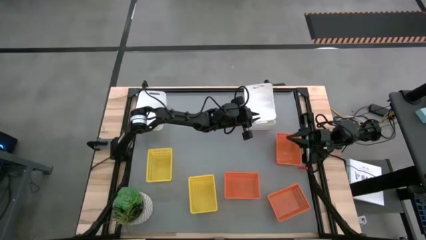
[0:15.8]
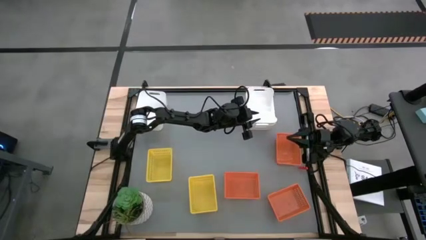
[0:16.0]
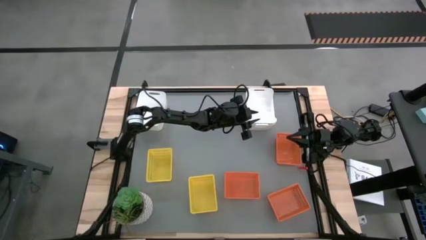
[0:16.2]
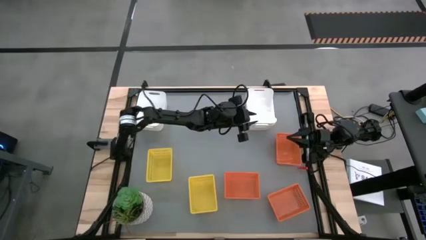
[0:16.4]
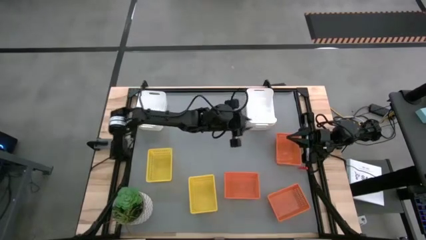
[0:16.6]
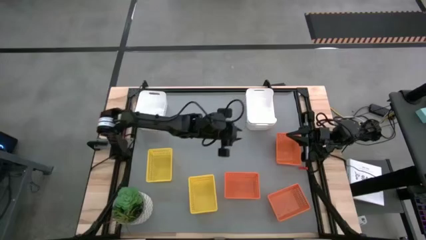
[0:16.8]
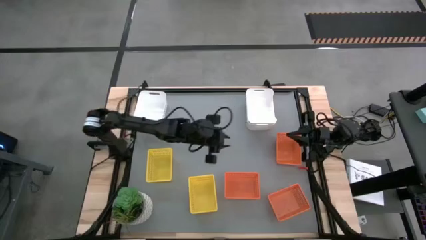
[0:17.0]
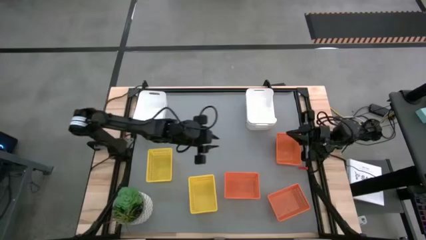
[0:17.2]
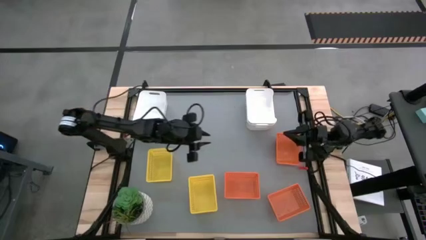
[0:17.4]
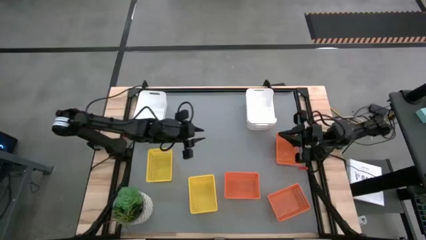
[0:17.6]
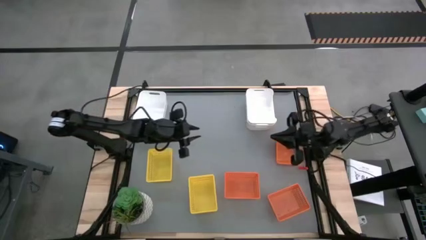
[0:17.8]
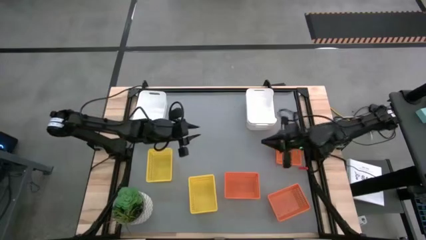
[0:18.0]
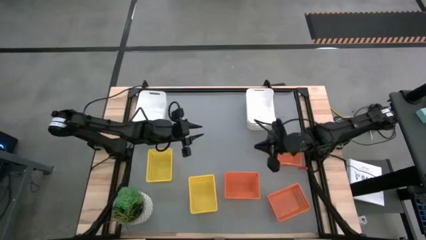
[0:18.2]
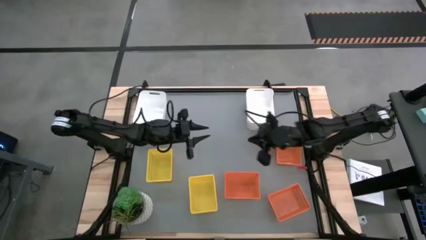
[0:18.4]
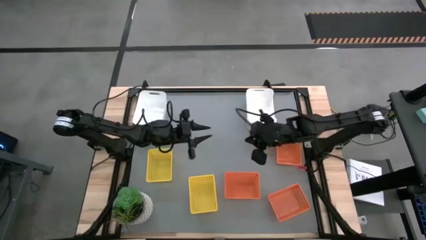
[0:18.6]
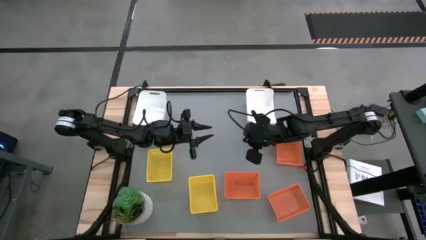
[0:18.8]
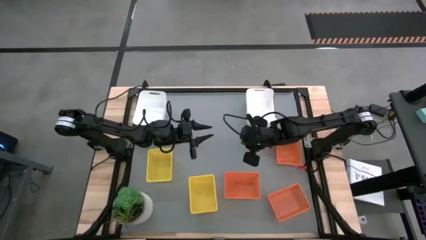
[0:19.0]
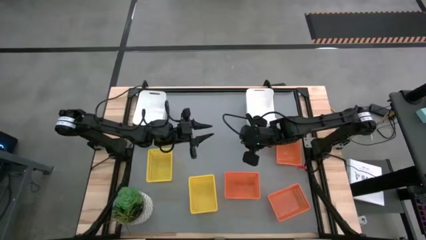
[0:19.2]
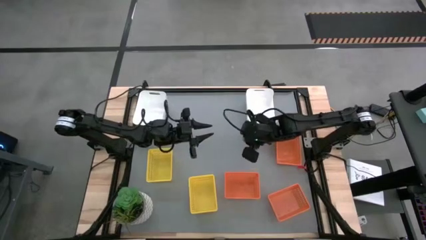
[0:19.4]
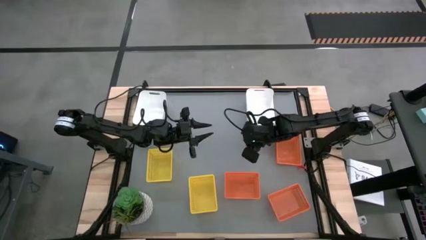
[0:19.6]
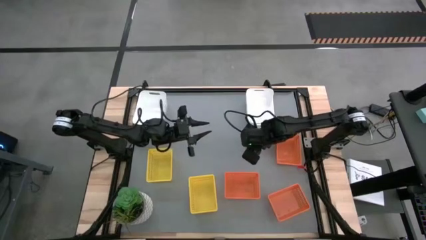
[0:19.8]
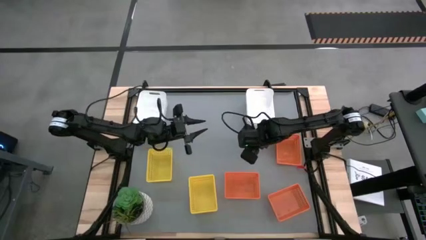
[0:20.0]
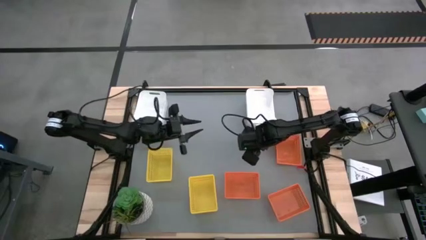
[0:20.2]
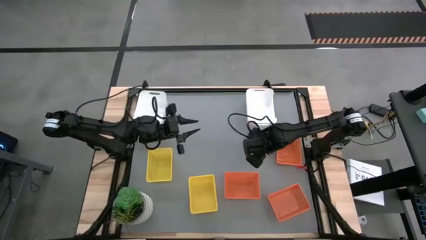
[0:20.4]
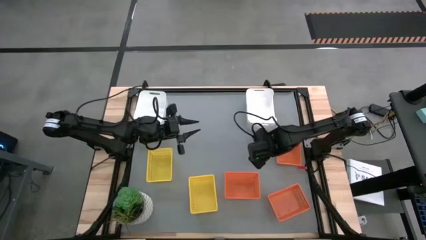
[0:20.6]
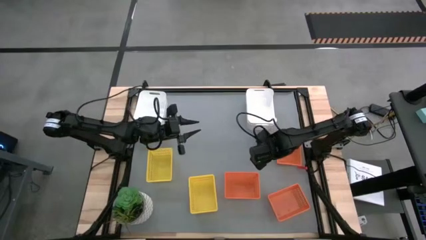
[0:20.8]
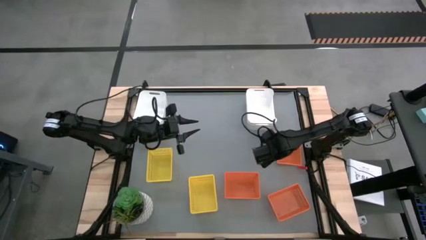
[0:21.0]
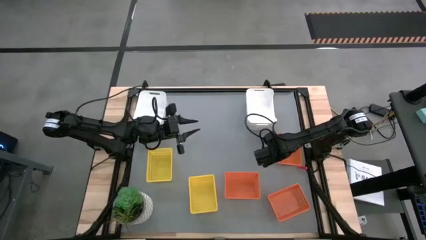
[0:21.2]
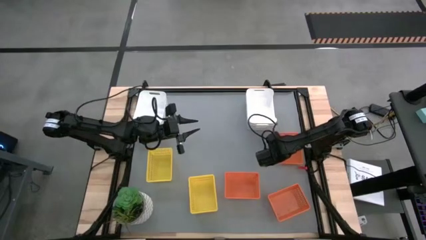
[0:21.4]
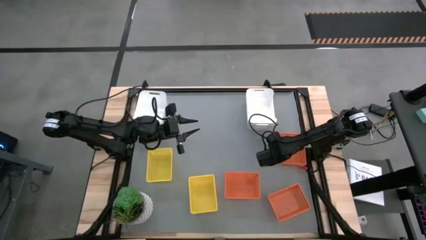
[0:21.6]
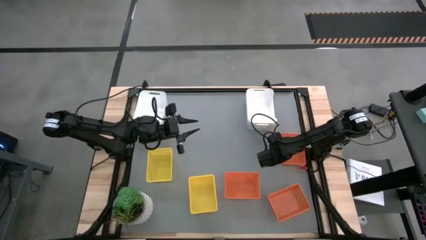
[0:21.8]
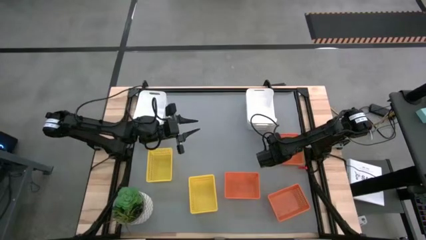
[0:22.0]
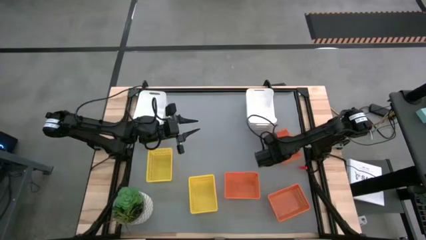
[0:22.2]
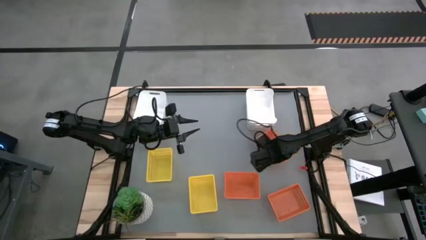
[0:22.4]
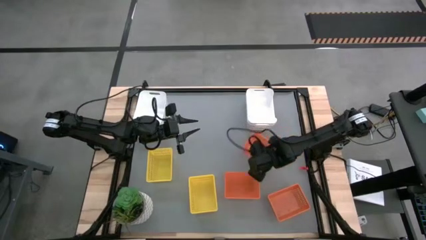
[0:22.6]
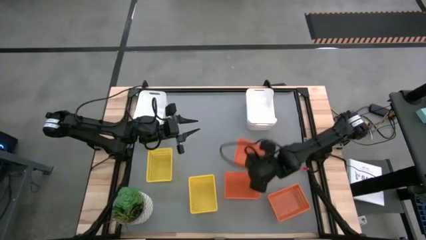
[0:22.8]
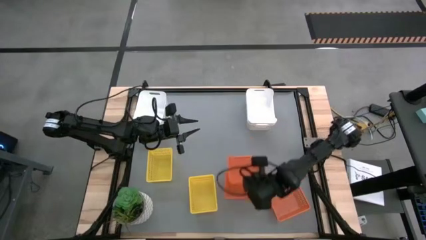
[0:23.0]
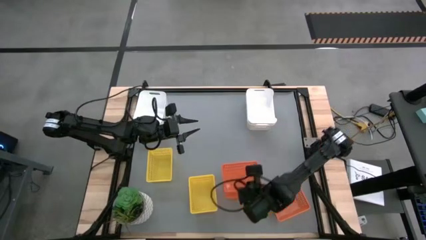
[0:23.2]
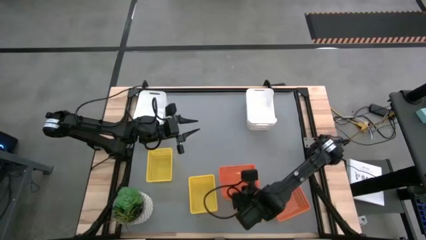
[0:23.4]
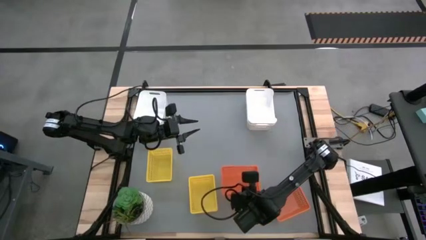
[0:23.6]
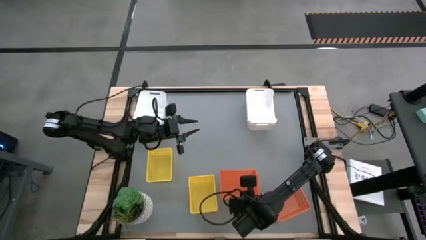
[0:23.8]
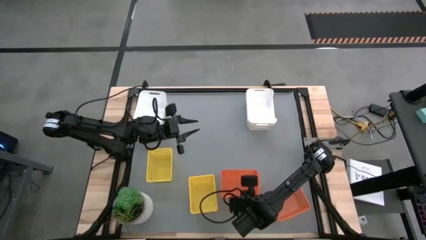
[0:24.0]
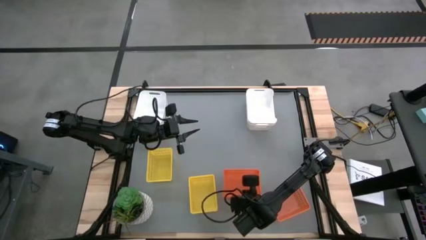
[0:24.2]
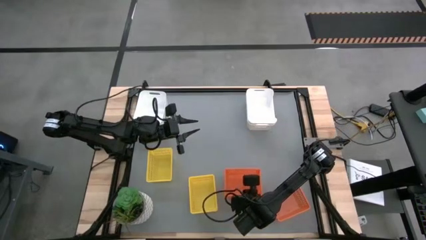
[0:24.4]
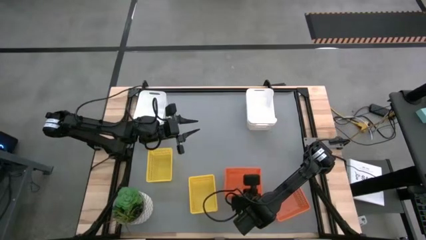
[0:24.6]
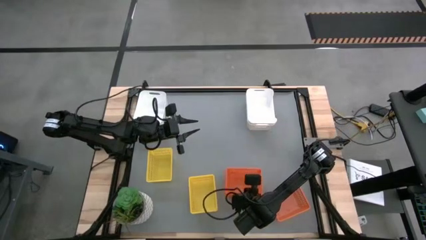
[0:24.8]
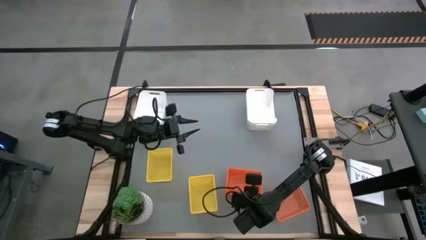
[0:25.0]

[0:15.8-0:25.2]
Stack the top orange bin on top of the middle orange bin

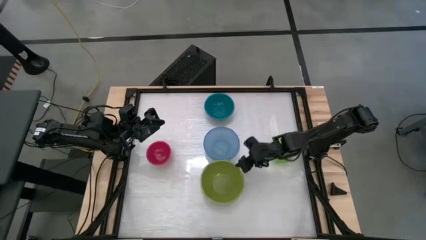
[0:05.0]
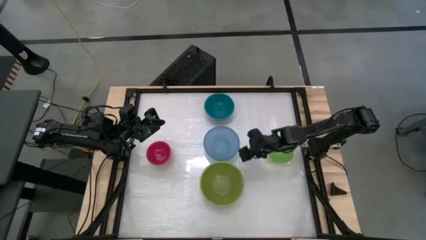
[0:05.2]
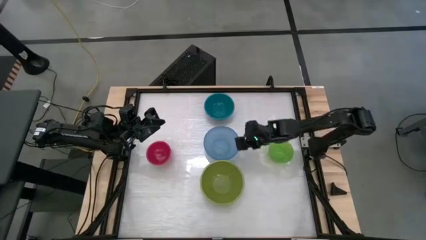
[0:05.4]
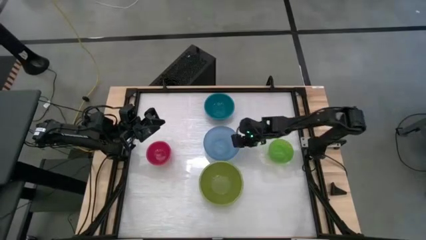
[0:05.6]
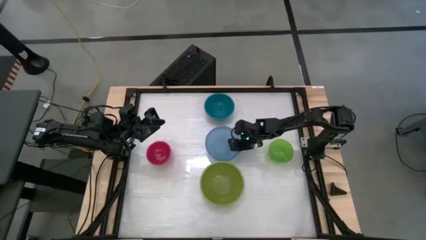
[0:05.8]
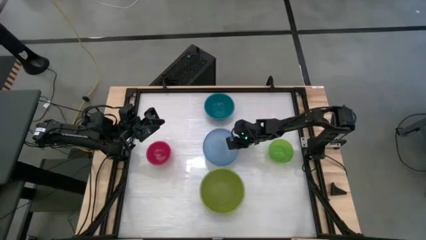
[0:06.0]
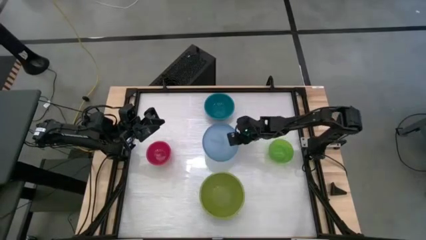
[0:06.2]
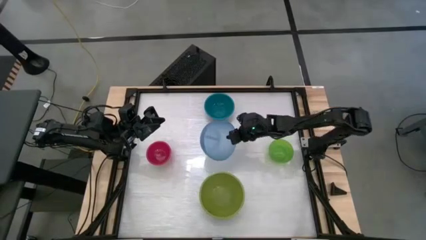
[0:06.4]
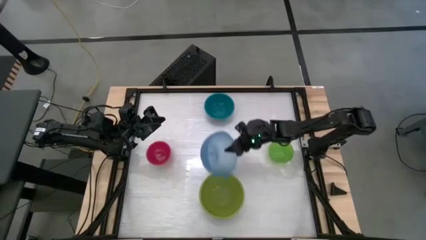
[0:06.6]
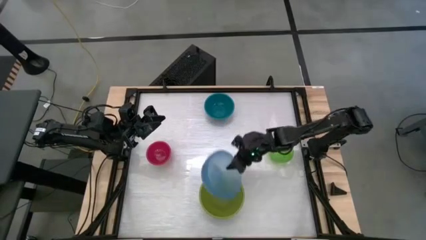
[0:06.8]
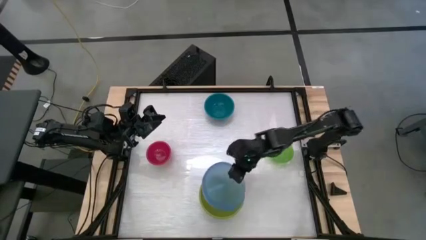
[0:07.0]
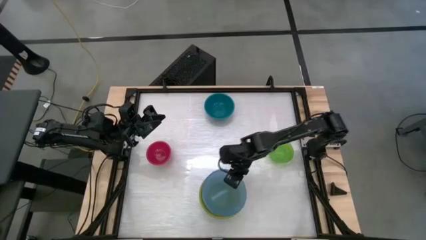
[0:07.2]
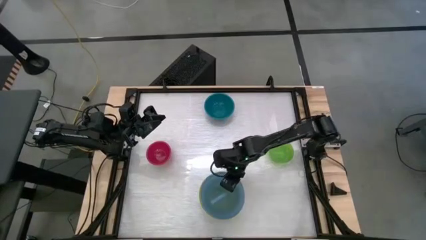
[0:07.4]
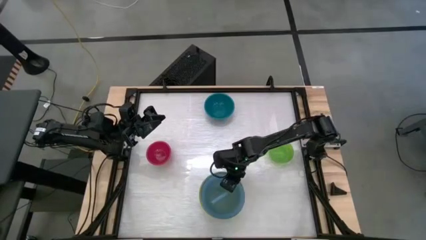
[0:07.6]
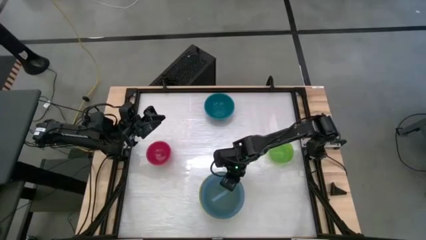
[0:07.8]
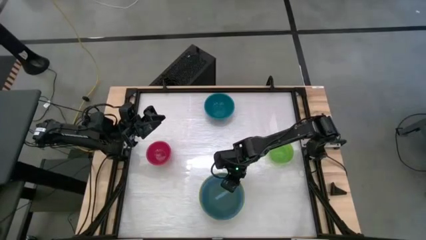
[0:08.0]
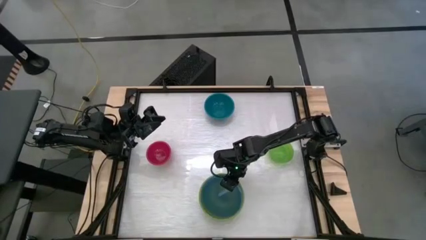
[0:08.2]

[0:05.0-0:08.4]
Stack the blue bowl on the light green bowl

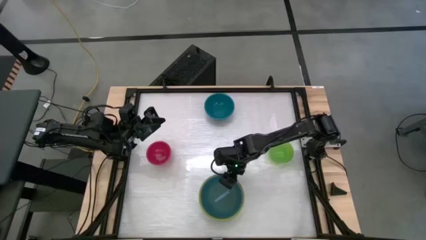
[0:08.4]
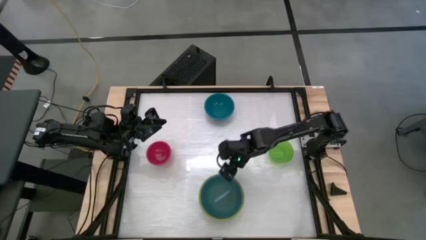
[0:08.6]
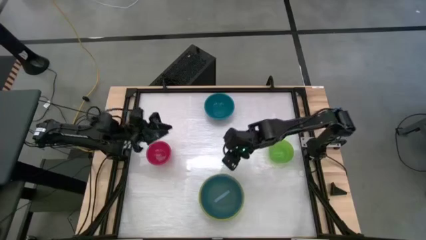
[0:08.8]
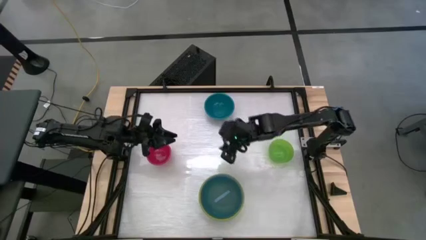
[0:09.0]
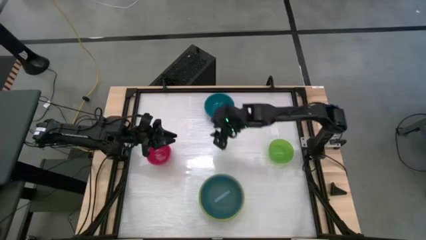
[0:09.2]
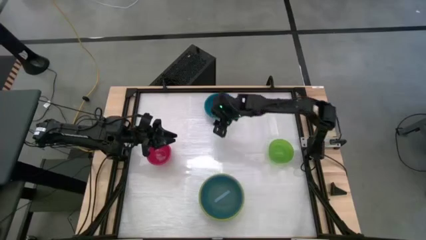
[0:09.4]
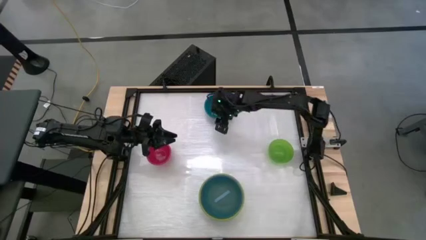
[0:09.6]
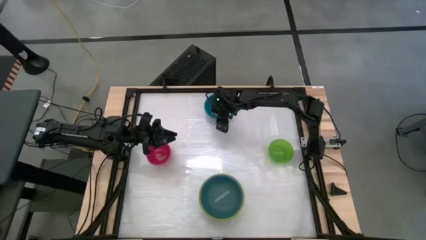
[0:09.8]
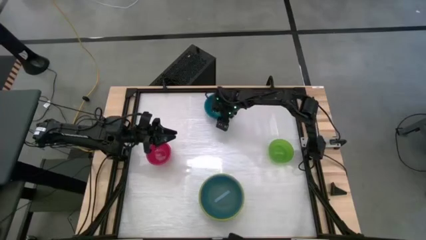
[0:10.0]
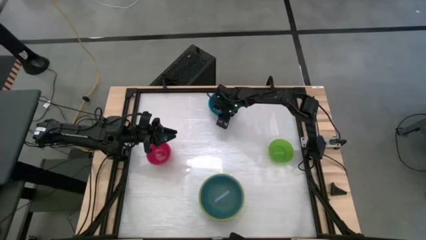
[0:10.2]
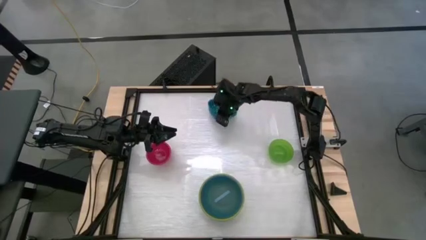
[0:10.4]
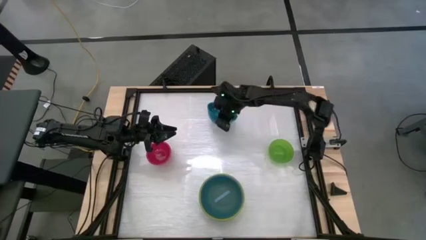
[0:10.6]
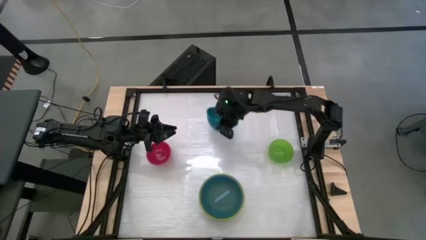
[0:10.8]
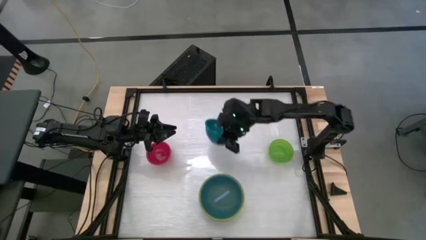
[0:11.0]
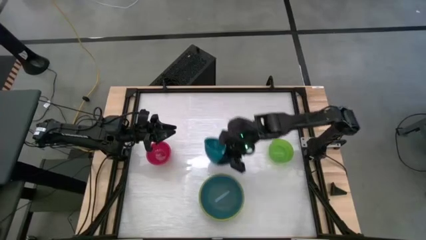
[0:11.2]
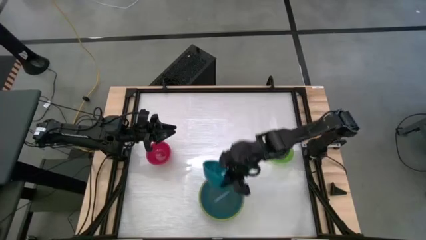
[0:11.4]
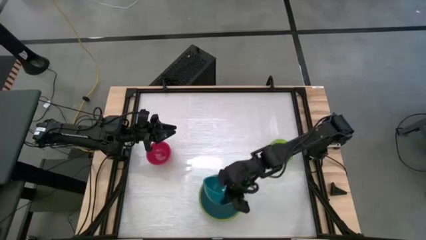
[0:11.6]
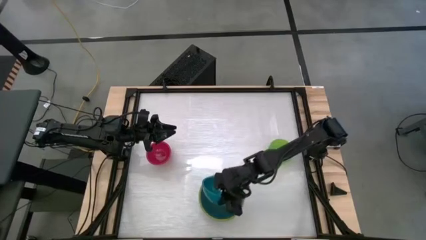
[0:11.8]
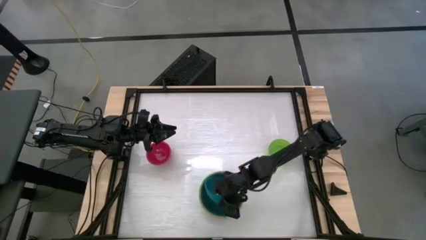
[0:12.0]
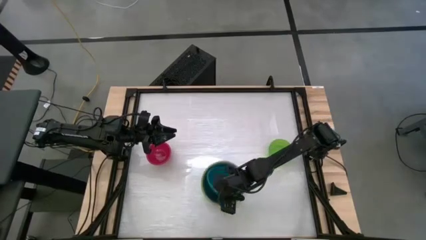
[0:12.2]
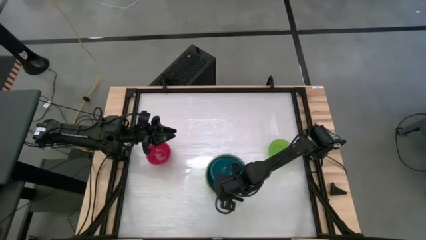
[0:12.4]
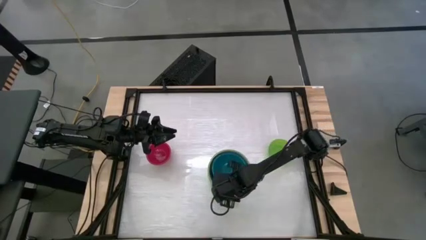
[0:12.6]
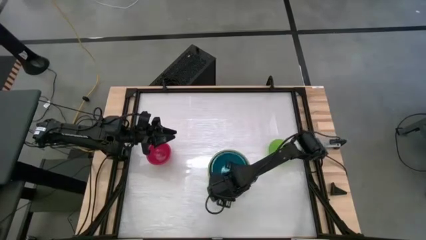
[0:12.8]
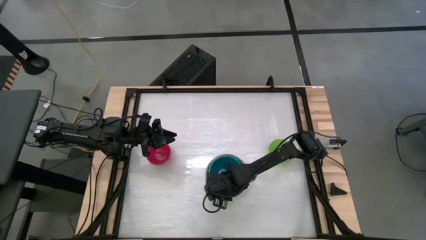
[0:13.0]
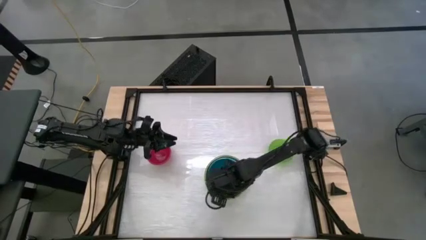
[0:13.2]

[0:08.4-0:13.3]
Stack the light blue bowl on the blue bowl
